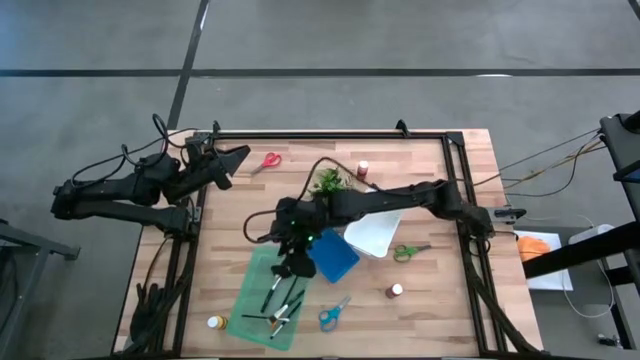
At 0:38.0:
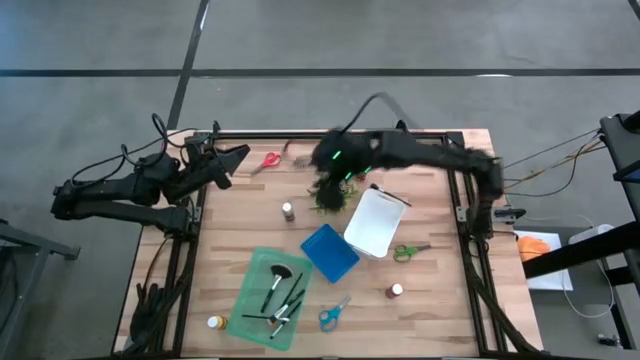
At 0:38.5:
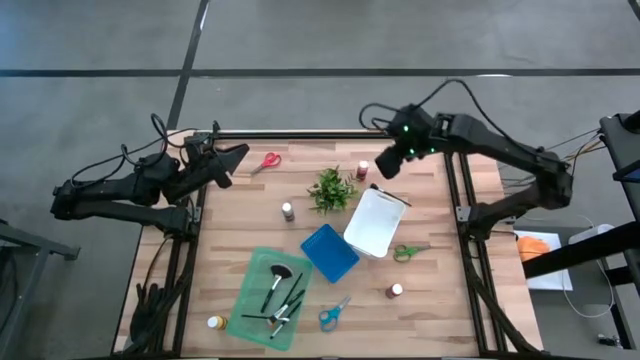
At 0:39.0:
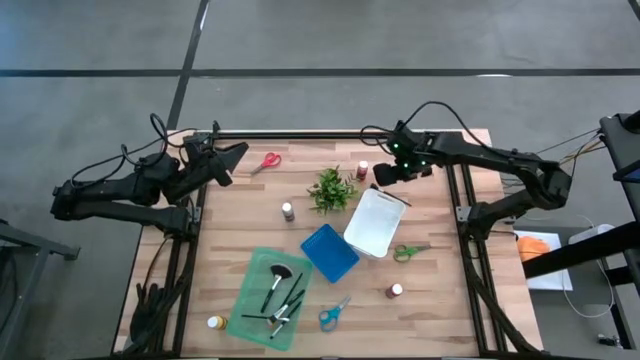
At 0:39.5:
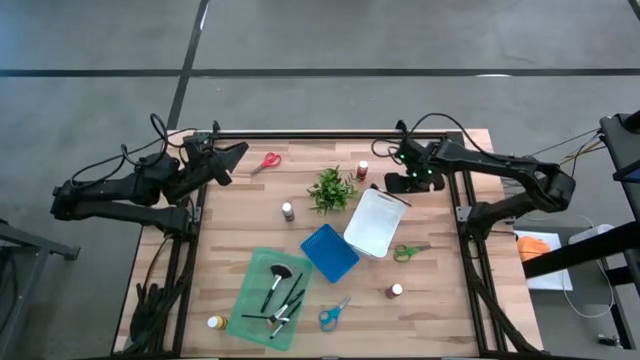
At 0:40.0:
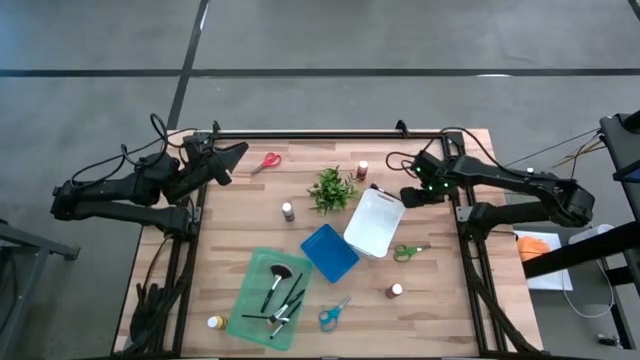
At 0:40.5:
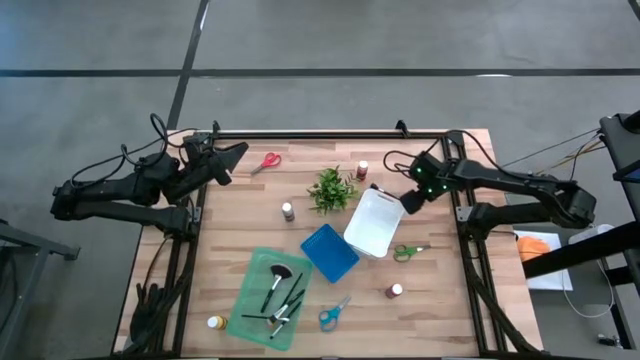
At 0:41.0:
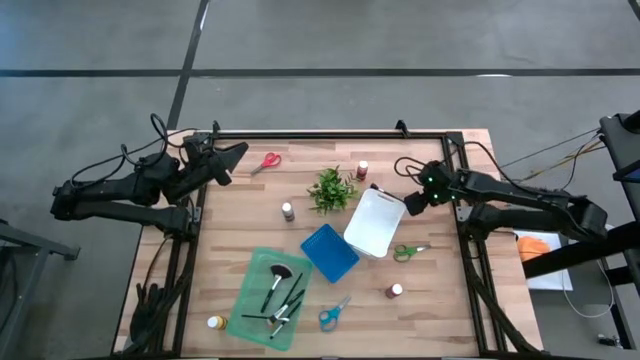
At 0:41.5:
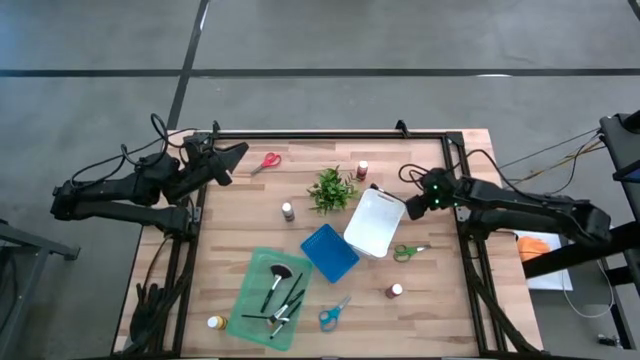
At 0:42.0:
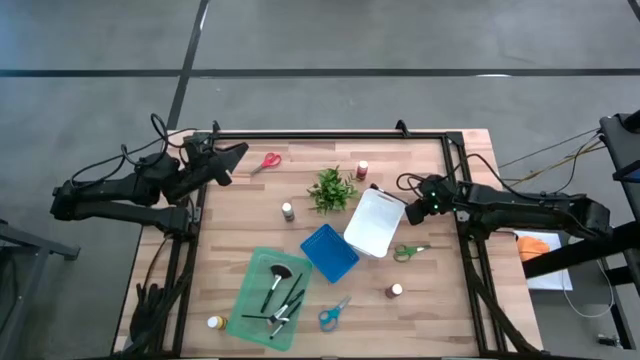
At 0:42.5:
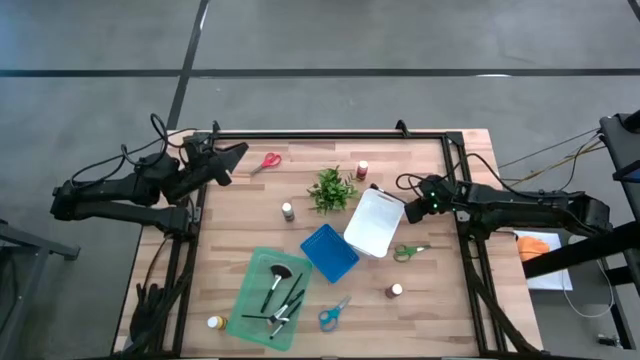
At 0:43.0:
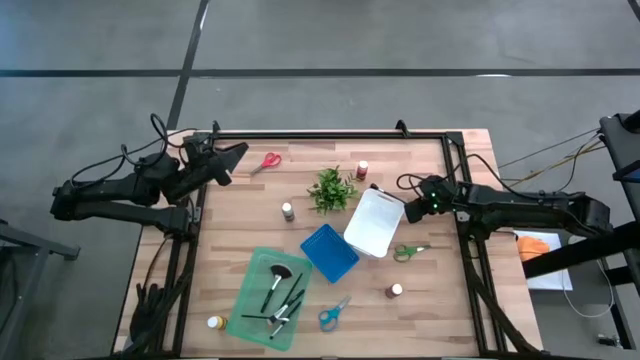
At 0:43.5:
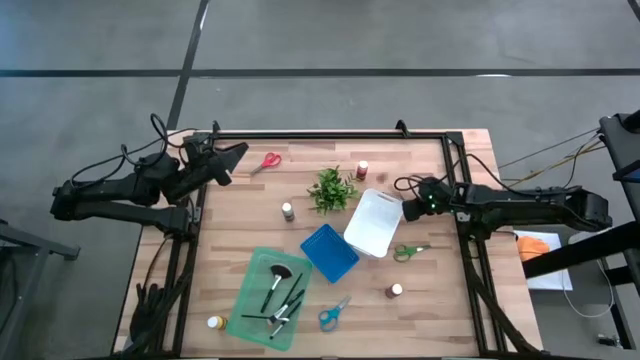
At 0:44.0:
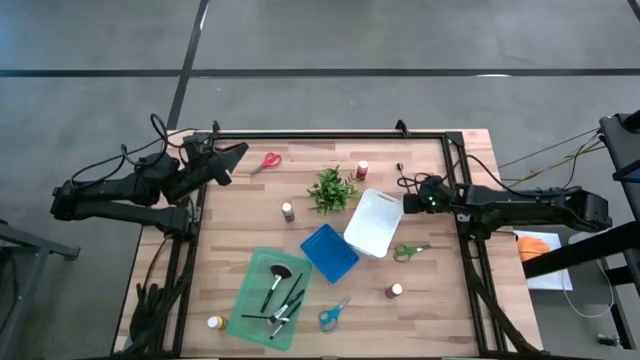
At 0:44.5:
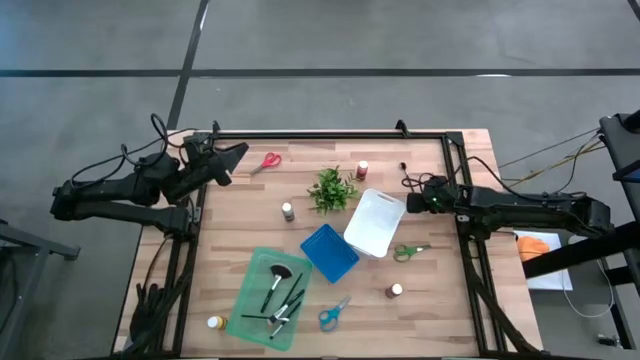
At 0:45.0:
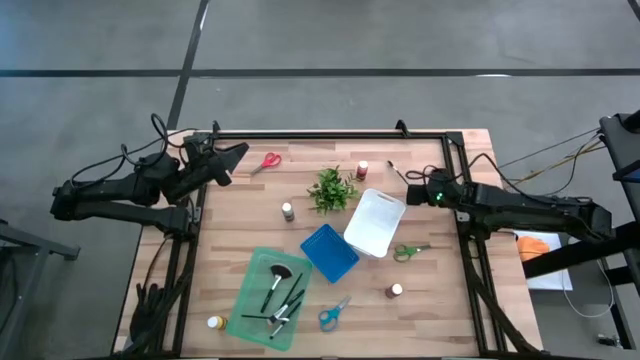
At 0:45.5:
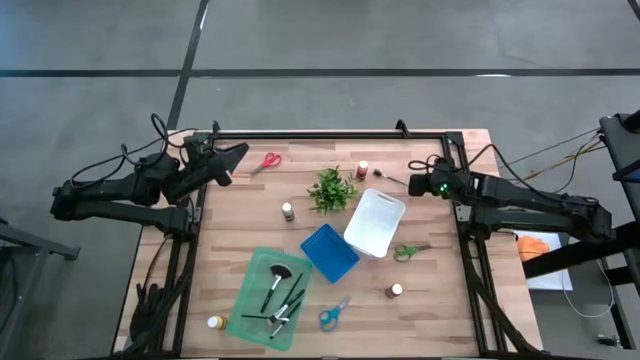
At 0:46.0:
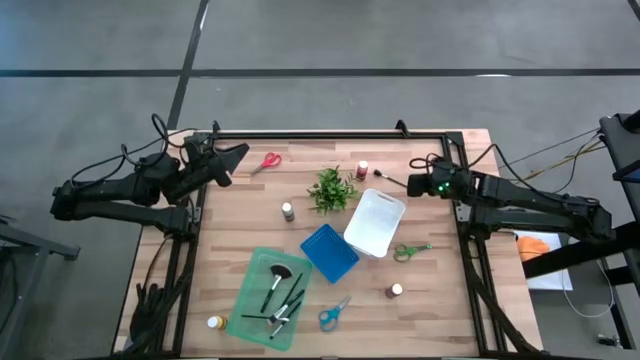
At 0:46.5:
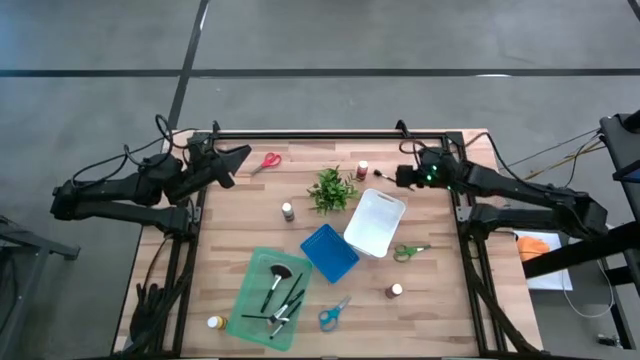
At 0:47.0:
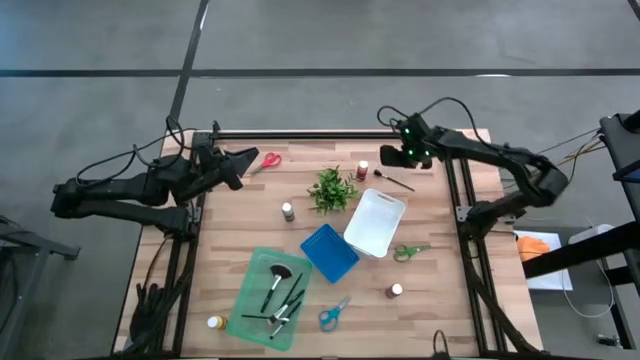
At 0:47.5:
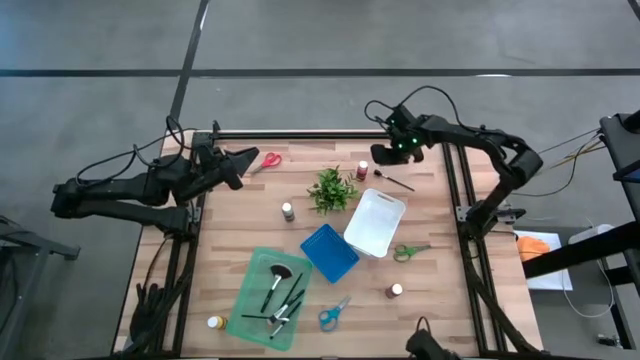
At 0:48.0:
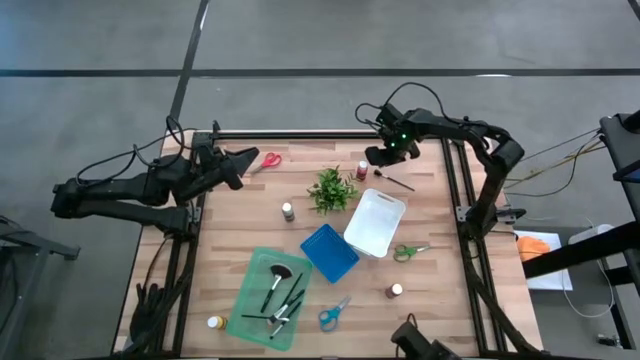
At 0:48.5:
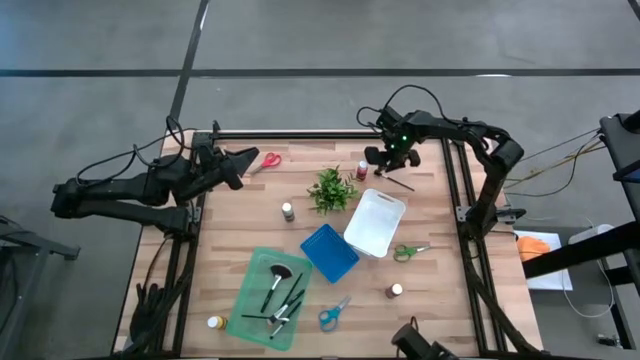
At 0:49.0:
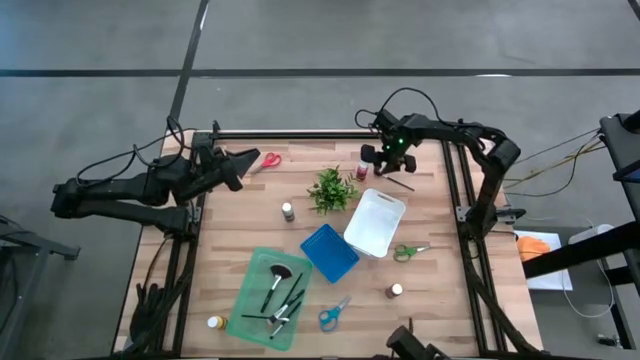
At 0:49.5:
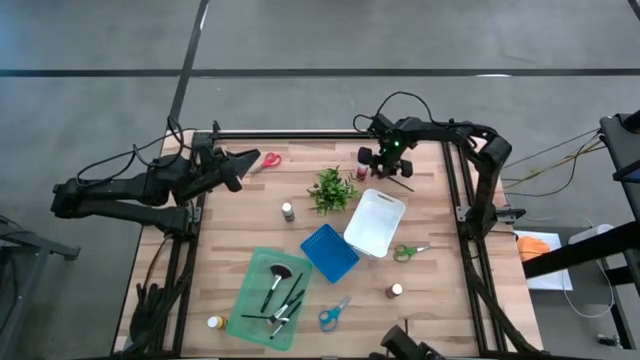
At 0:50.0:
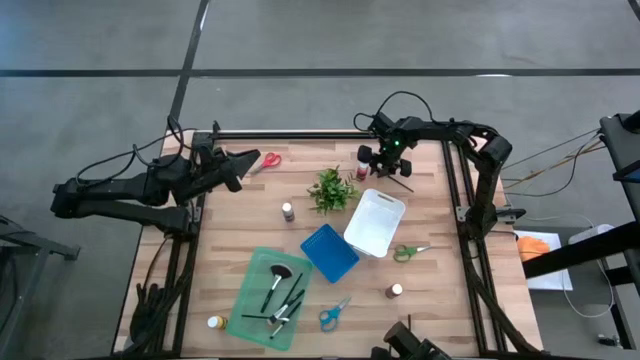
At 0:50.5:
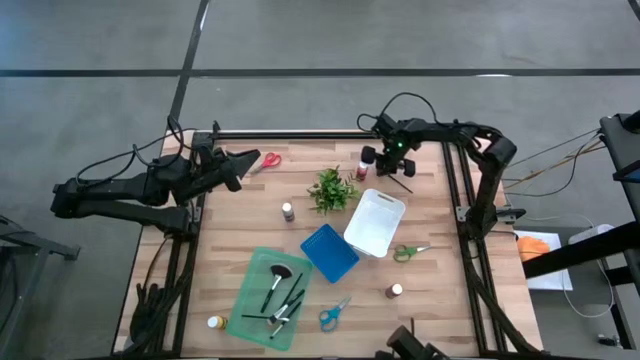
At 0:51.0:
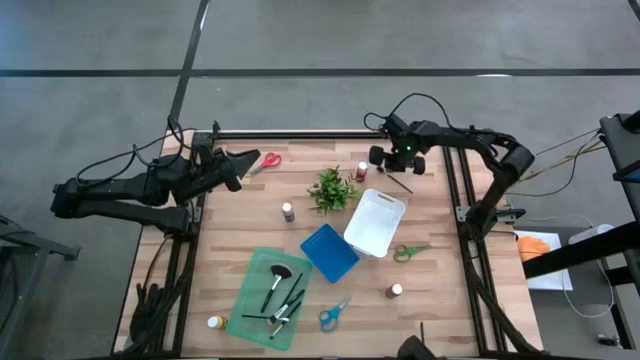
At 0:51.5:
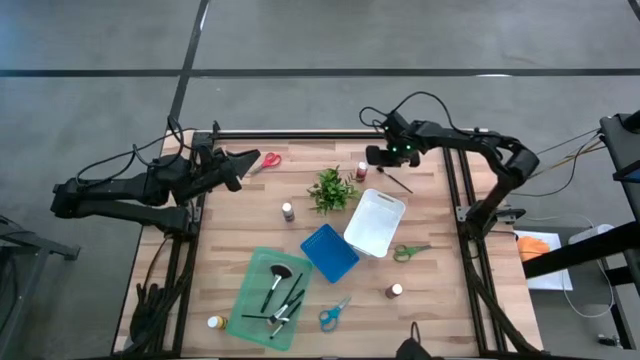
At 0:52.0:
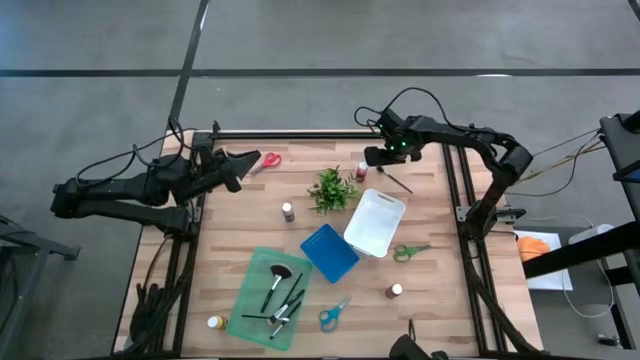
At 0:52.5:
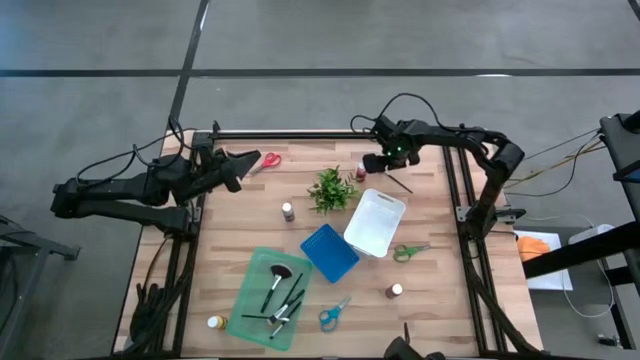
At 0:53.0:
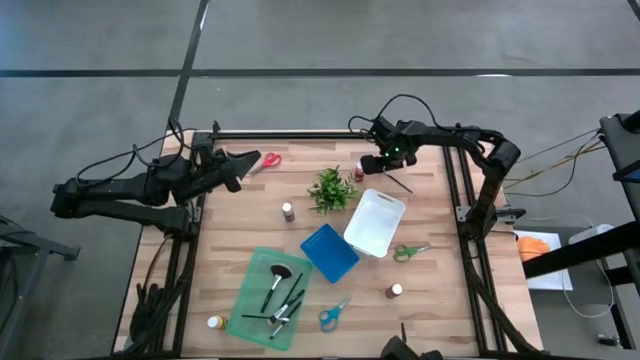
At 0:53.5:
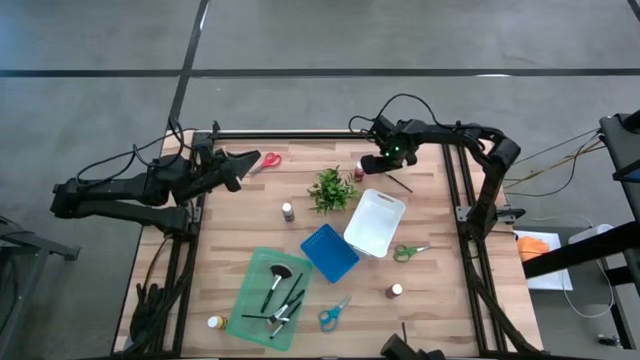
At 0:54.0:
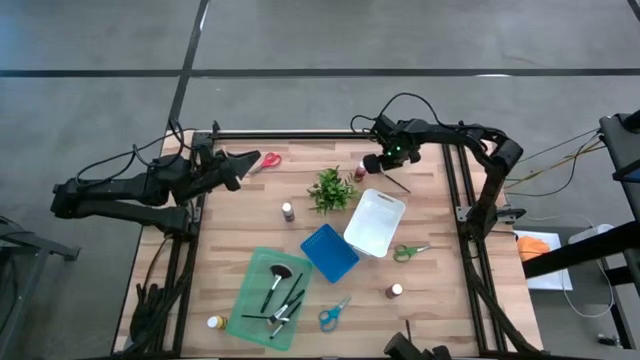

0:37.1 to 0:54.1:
Task: Pick & Place Paint Supplies
Put the black eye groomer brush into the green bin

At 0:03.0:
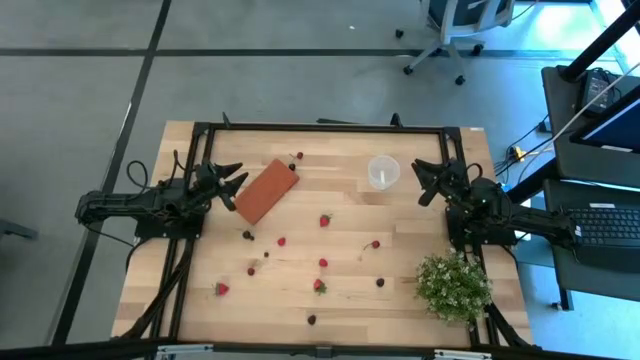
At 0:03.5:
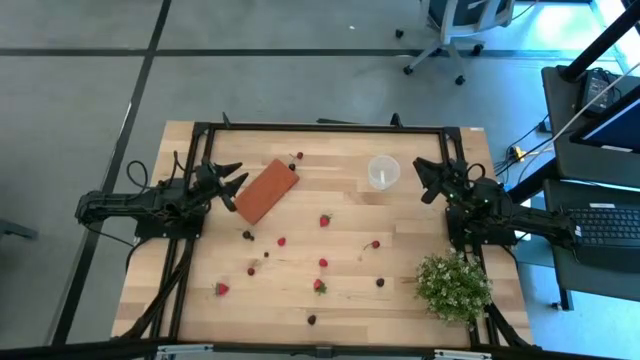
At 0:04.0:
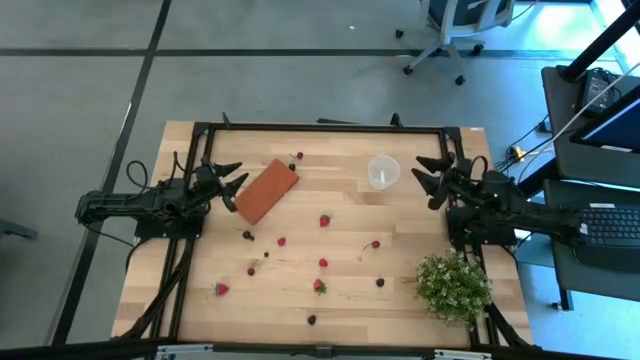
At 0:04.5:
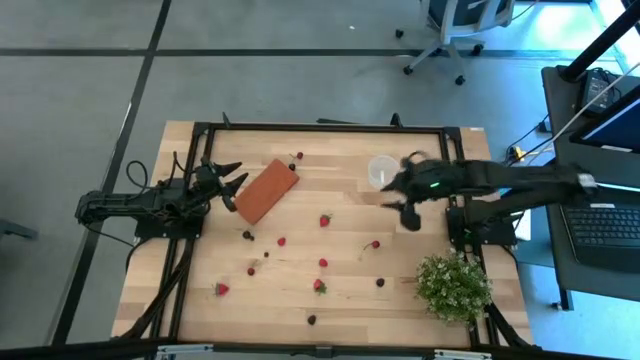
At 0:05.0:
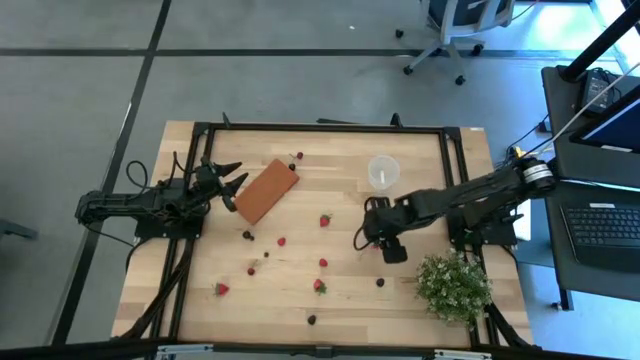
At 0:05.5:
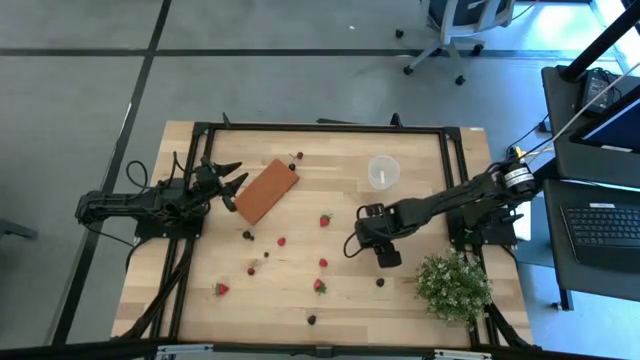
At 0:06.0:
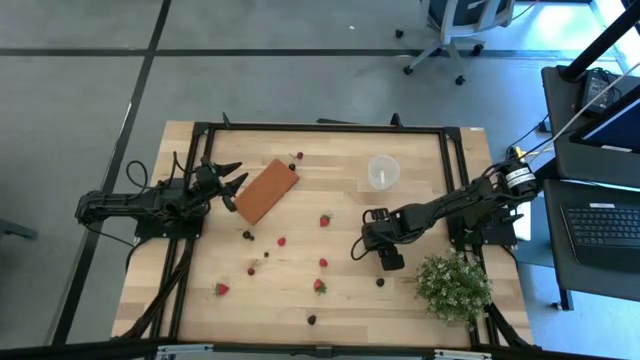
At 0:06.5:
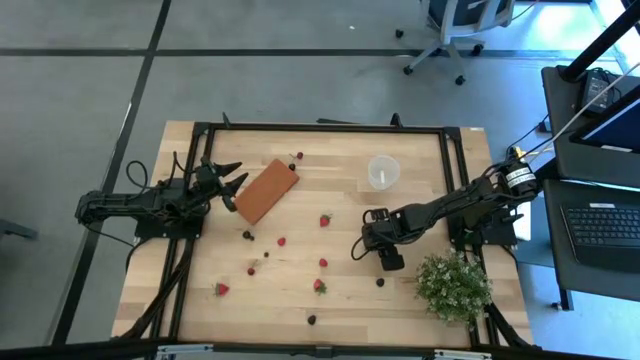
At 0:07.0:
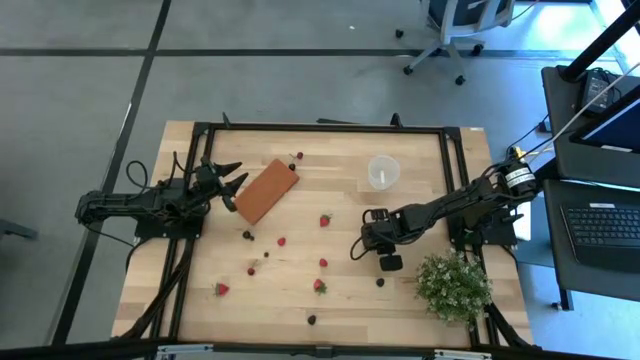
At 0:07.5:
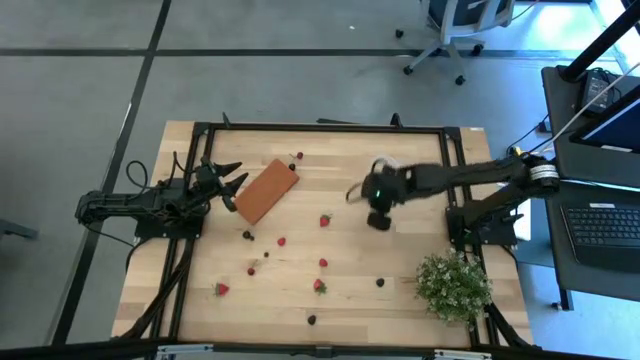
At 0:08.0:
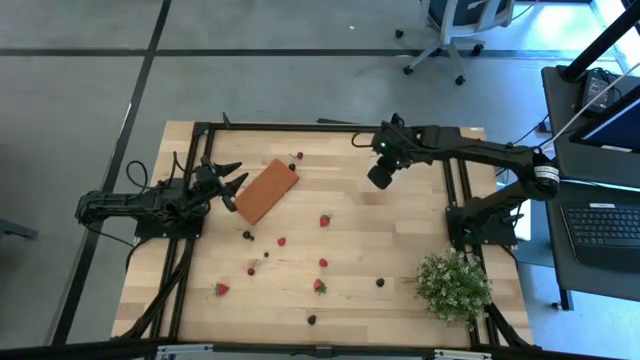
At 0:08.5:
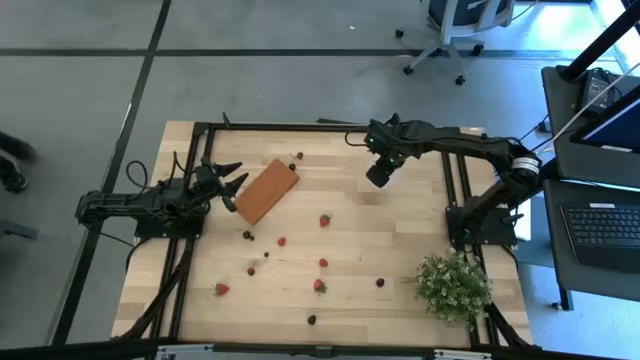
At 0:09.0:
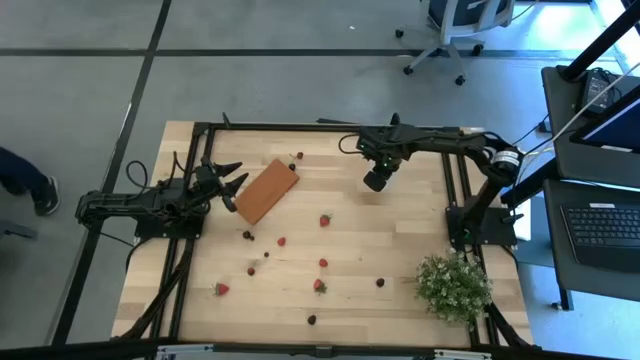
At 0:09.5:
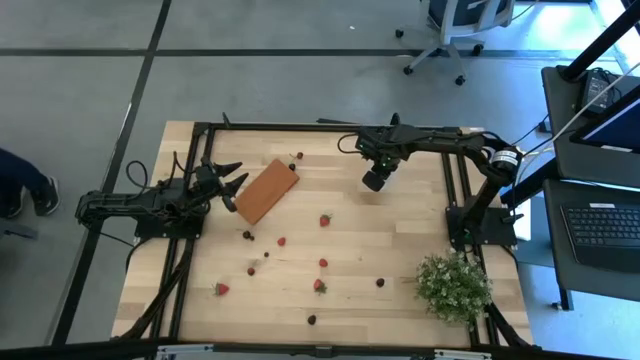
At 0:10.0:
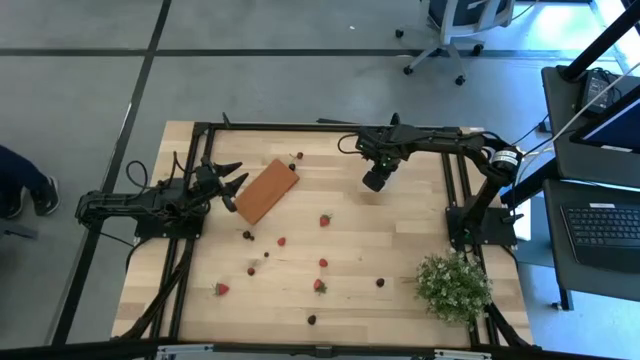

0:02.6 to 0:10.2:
Task: Pick and placing Produce into tupperware
Put the middle red cherry into the transparent container
